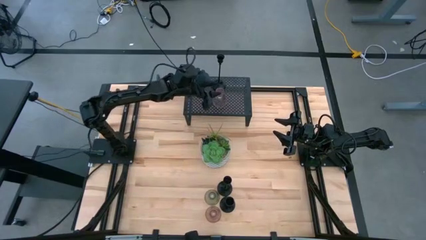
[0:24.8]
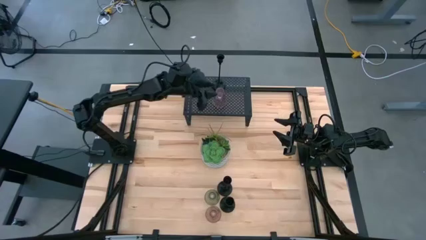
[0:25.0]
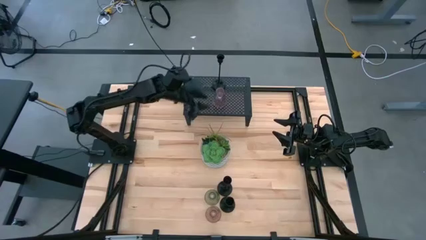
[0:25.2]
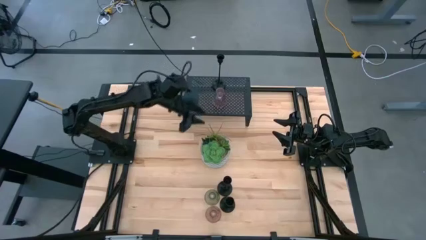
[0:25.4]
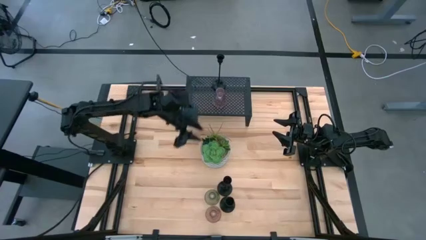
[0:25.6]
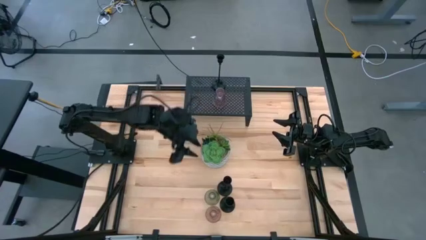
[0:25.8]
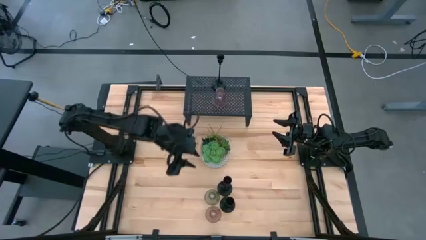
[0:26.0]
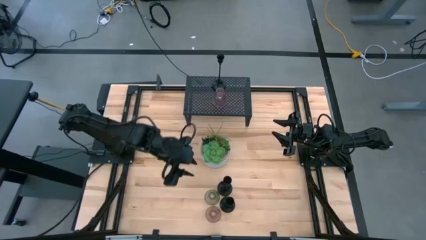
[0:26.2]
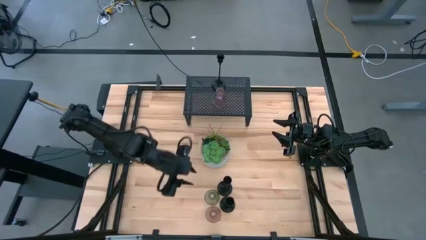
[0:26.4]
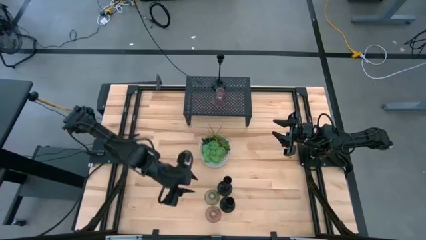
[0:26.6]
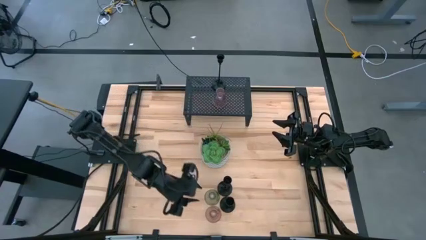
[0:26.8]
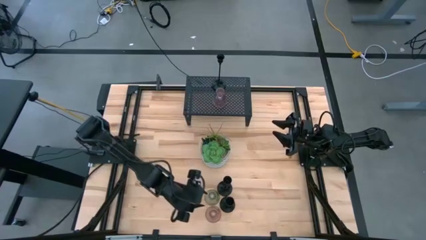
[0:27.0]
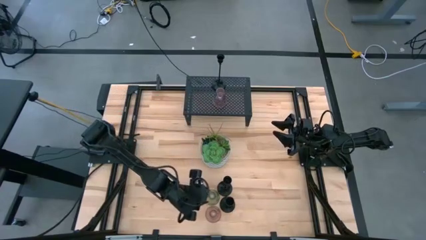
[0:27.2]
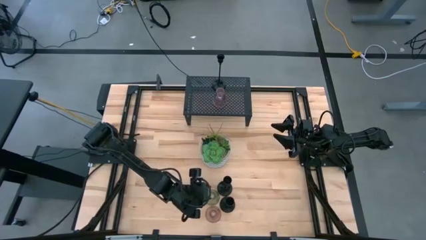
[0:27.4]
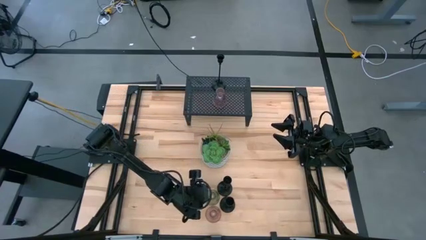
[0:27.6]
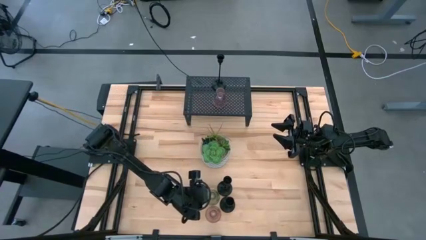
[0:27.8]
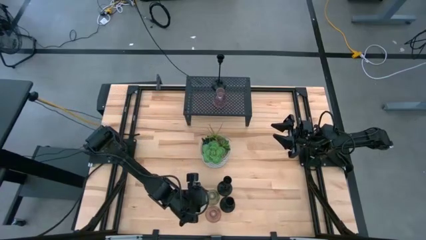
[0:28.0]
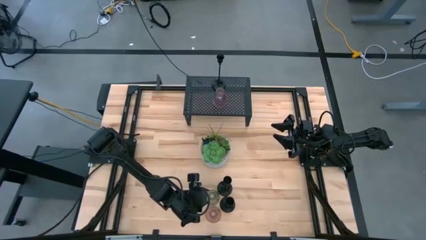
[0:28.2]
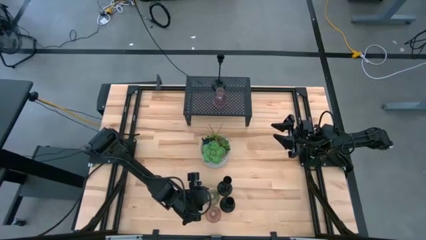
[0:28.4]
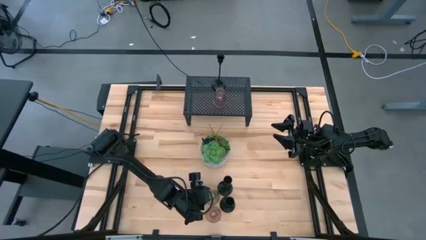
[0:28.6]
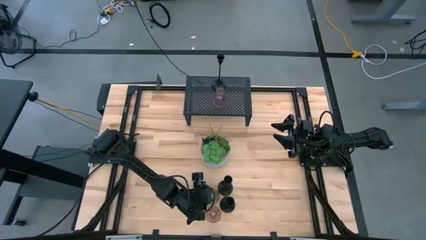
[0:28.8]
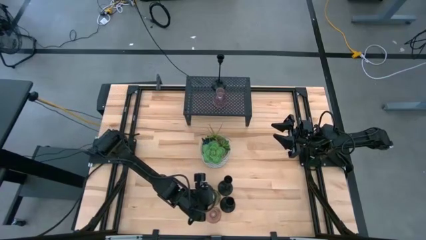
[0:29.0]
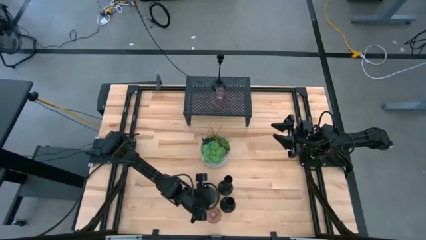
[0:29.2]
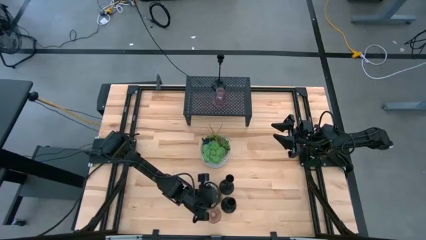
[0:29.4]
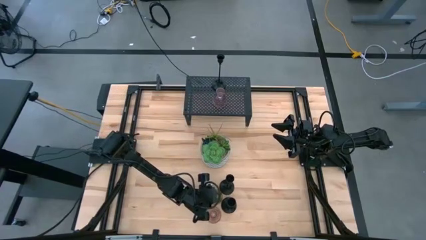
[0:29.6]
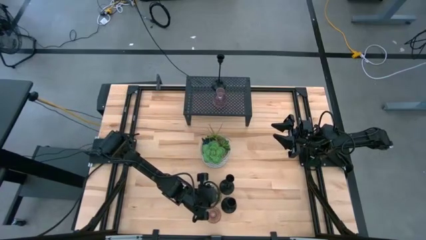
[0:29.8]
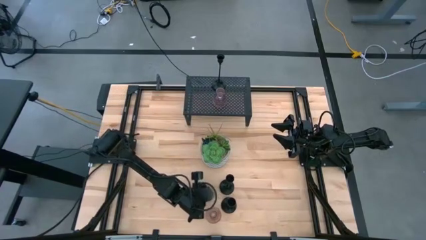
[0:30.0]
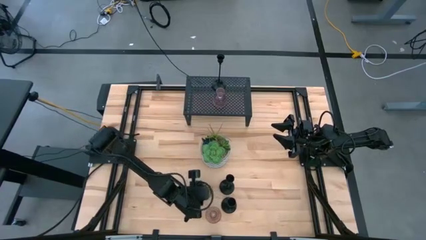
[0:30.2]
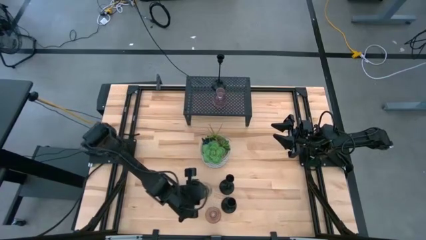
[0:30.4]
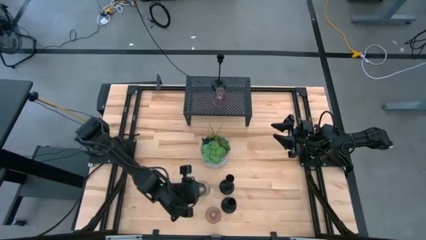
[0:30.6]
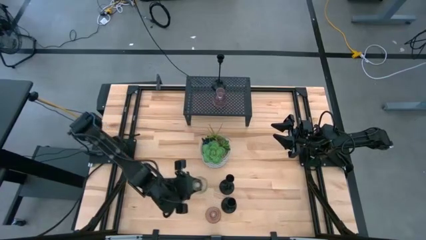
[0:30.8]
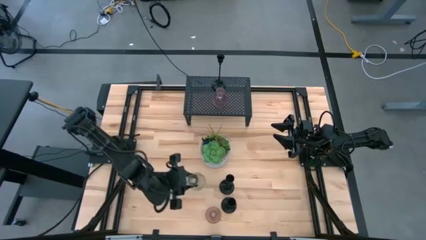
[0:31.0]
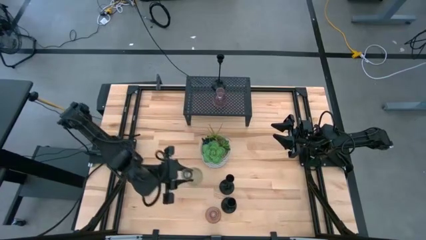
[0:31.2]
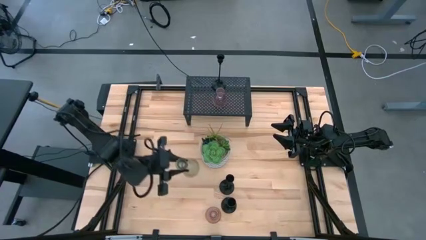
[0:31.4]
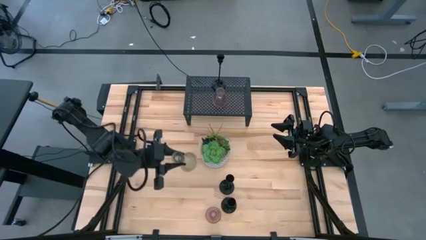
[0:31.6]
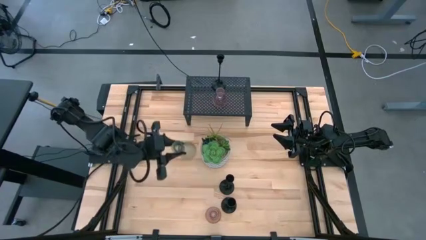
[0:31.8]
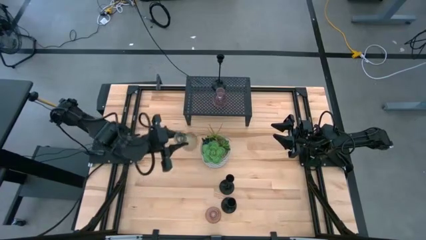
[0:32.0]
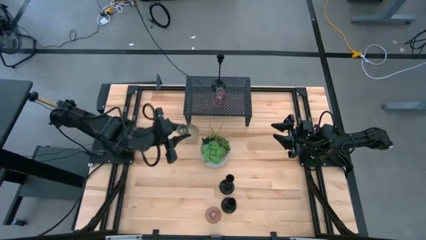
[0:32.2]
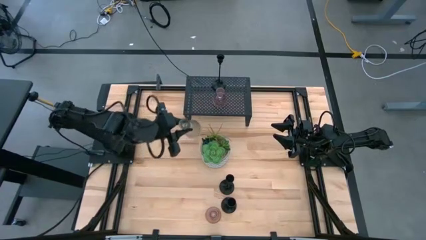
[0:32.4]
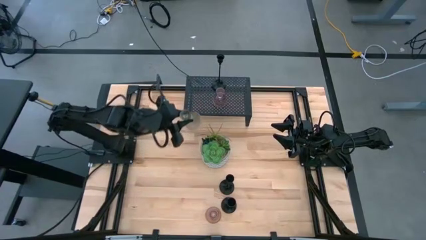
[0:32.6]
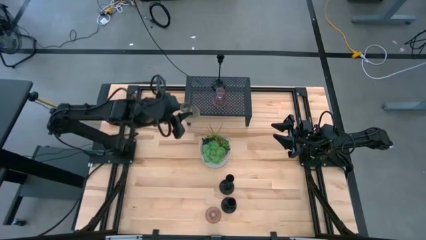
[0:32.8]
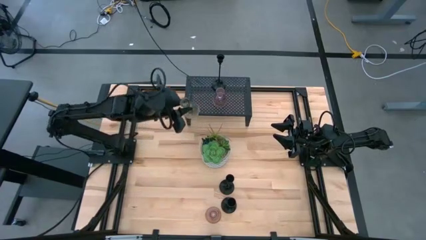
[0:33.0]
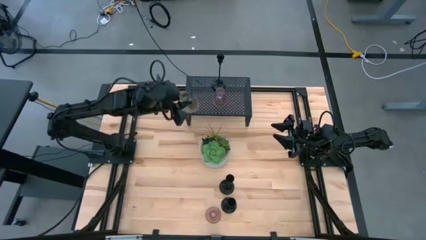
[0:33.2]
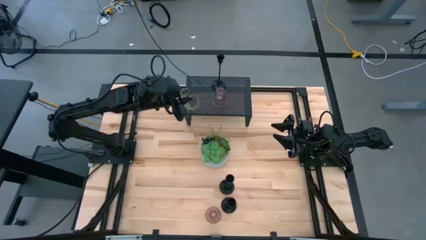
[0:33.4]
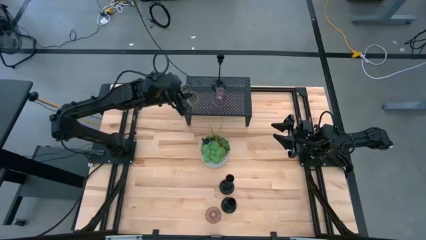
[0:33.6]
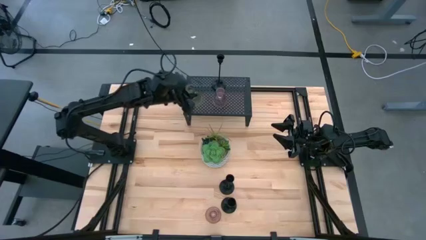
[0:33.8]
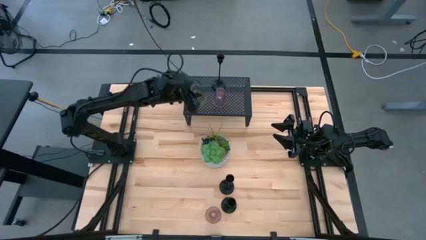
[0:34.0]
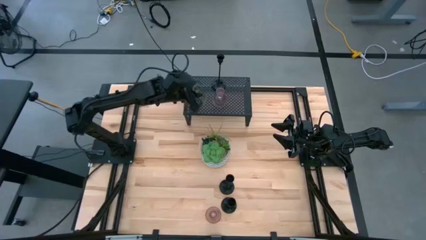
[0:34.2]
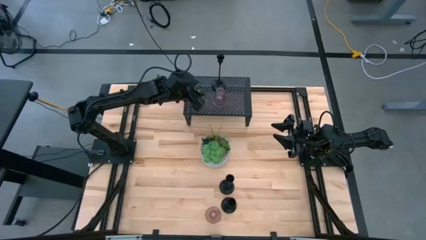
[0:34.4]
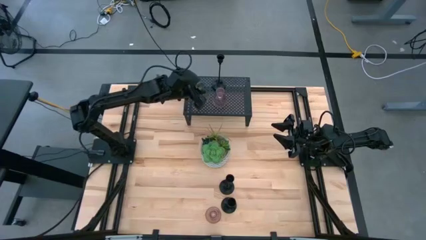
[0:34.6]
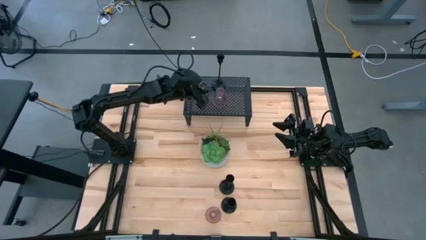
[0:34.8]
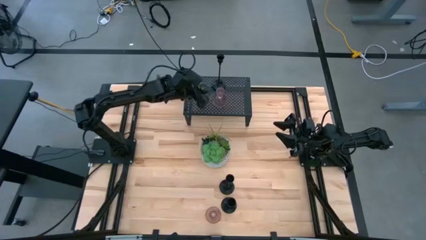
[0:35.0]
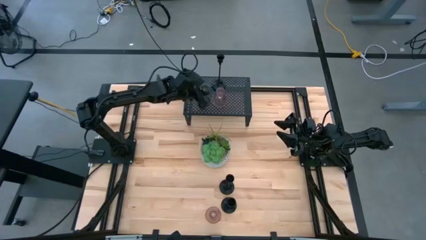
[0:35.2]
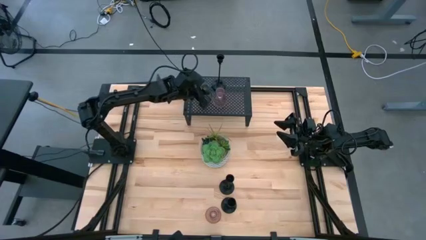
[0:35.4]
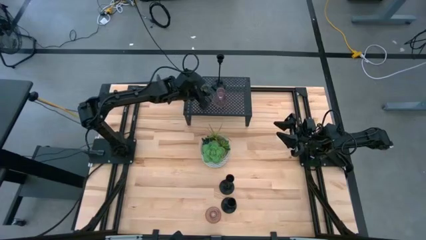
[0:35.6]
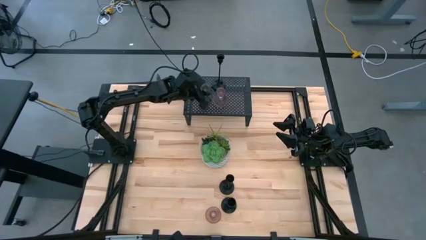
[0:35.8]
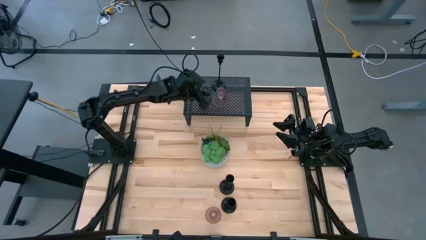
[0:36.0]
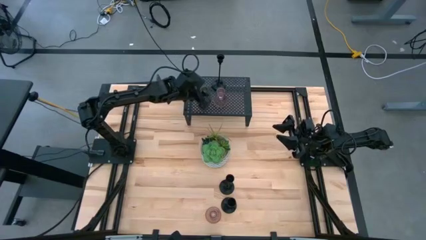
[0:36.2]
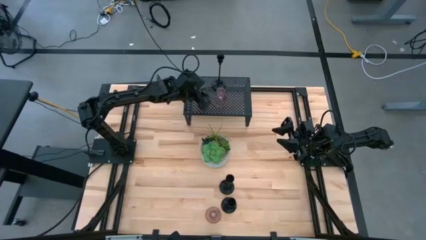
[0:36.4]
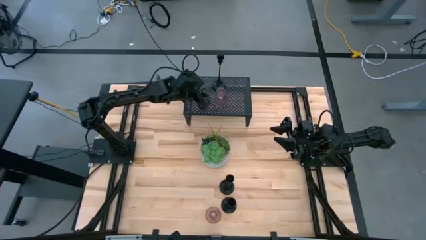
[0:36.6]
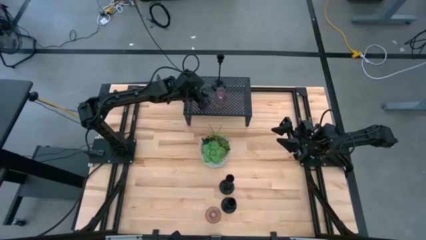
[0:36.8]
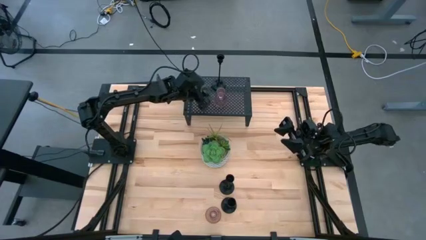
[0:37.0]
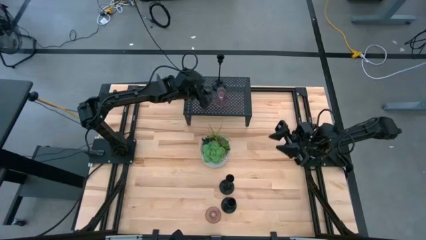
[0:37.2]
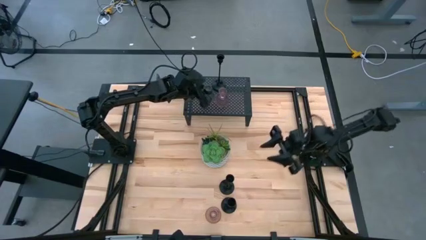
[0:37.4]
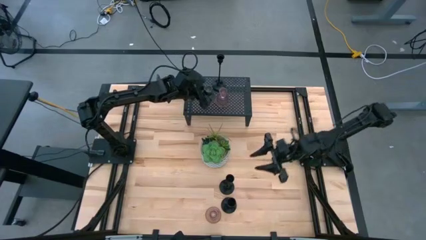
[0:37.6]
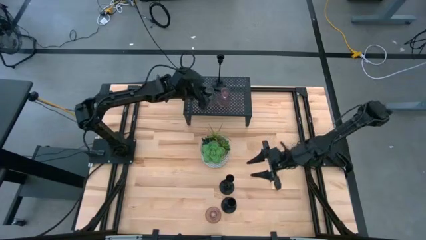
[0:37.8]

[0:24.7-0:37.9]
Task: Pick & Place candle stick holders
Put the green glass candle holder on the shelf aligned with the other pink glass candle holder

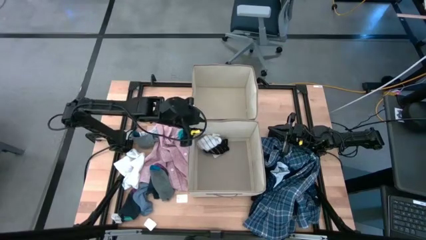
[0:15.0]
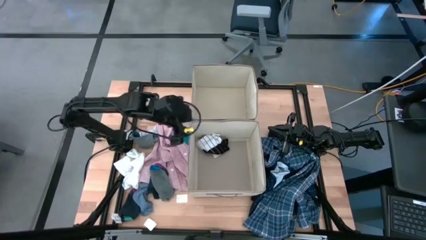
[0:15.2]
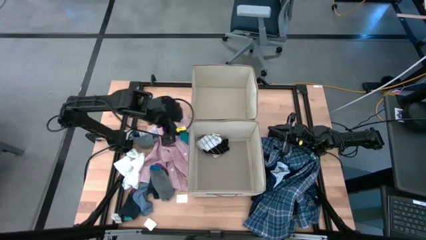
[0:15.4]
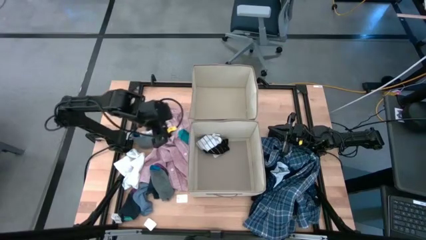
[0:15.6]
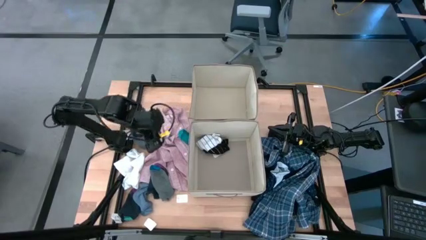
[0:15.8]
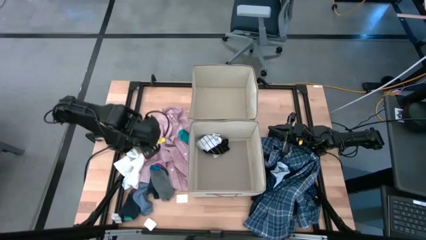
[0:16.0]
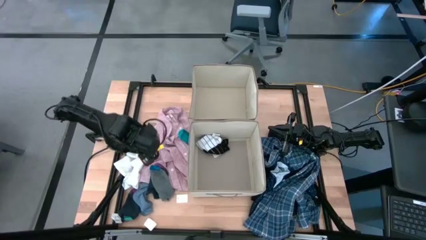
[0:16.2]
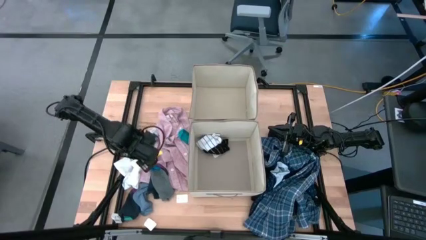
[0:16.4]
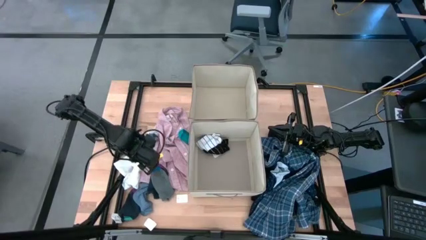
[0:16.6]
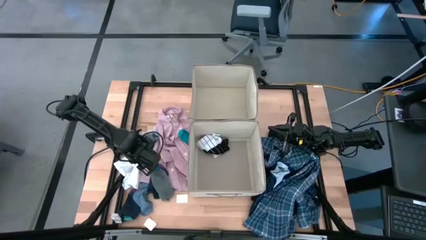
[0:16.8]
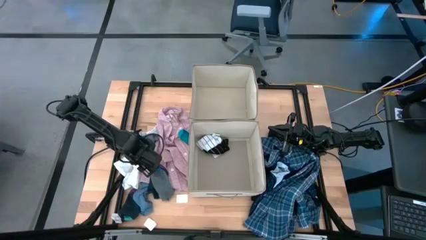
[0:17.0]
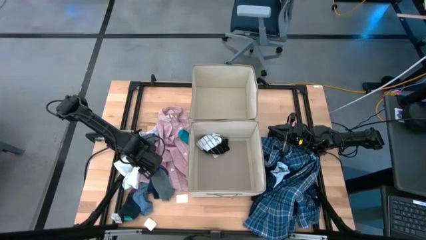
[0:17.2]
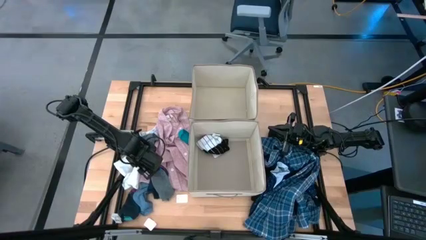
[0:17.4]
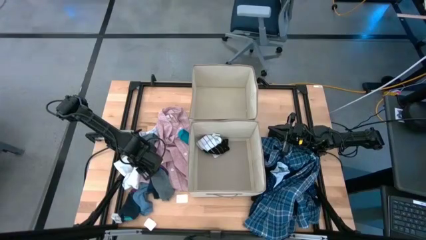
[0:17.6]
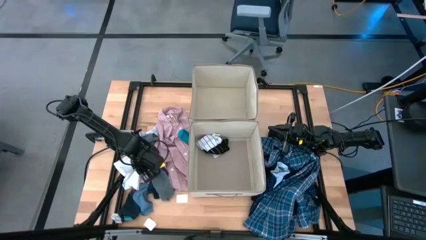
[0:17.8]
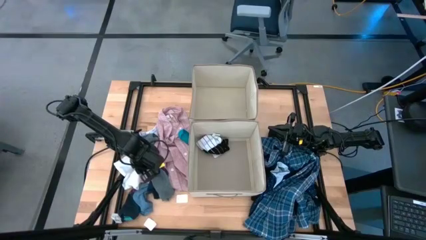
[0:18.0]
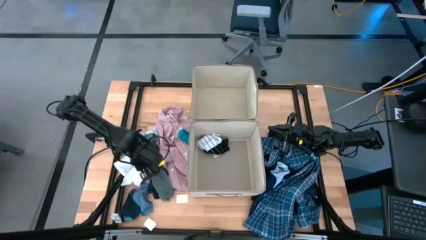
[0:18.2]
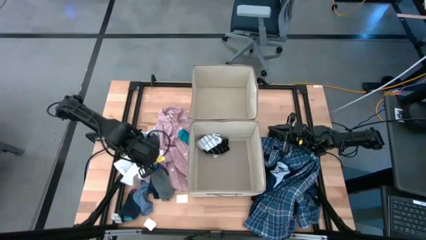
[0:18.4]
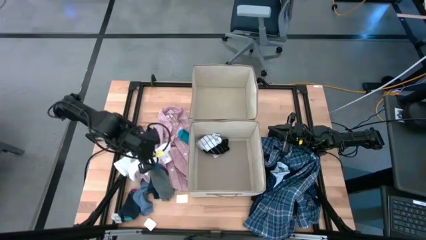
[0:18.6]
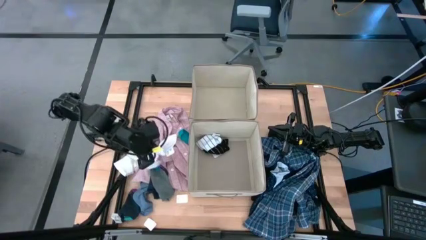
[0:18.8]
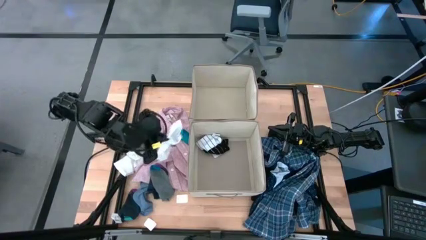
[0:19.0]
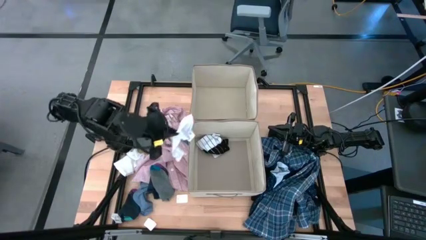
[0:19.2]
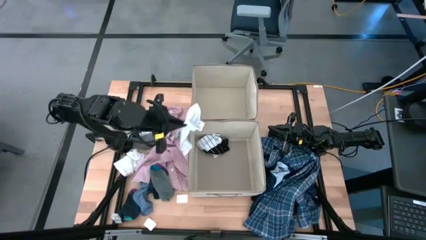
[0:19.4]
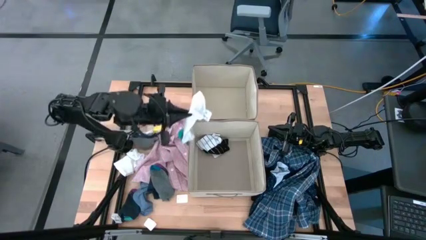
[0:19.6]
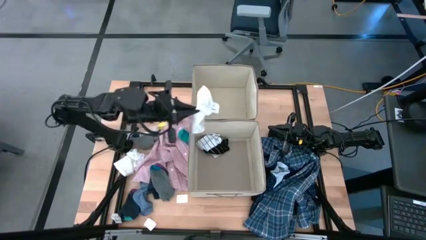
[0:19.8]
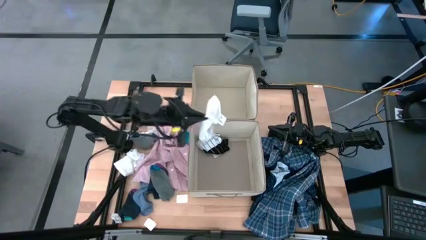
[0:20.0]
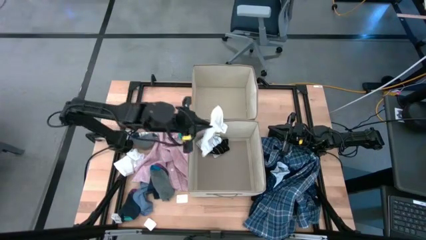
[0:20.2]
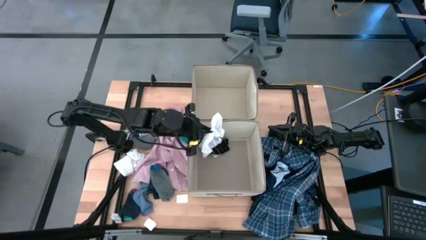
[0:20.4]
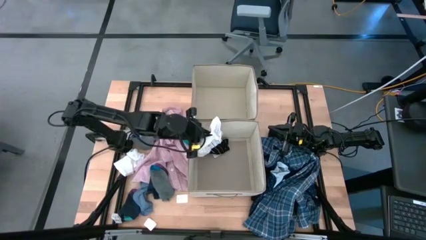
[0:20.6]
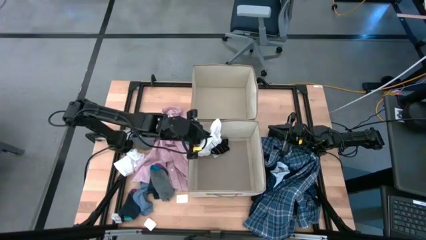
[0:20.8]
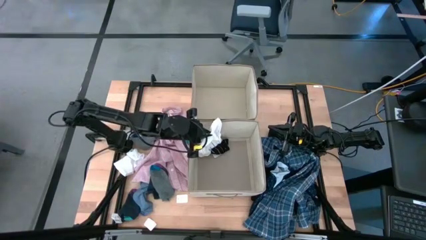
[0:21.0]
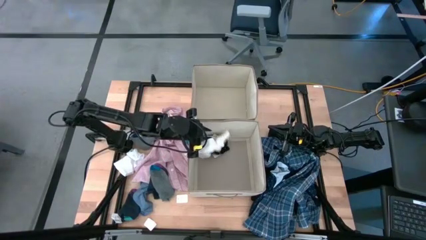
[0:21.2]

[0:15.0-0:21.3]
Task: Sort clothes
Put the white sock into the bottom laundry organizer
